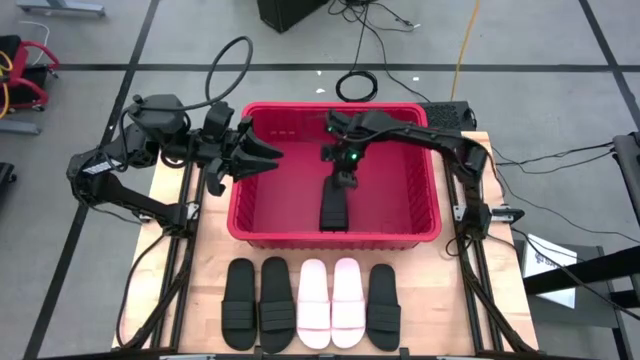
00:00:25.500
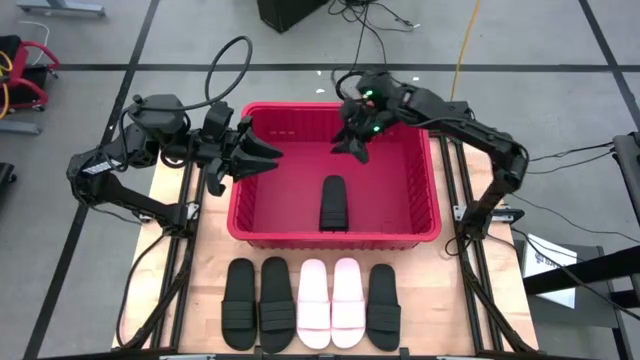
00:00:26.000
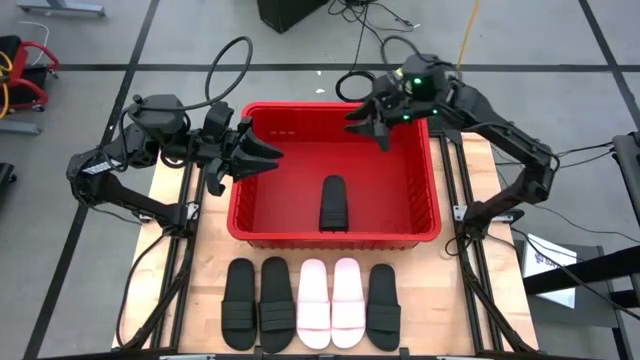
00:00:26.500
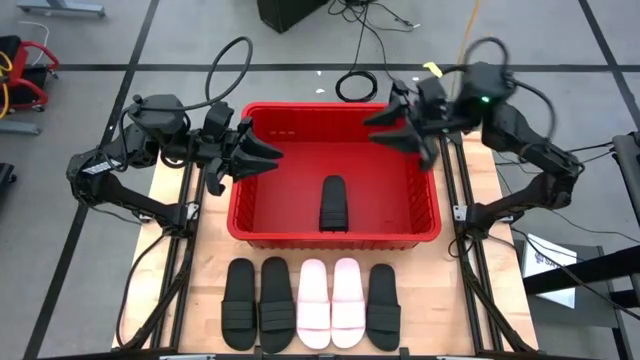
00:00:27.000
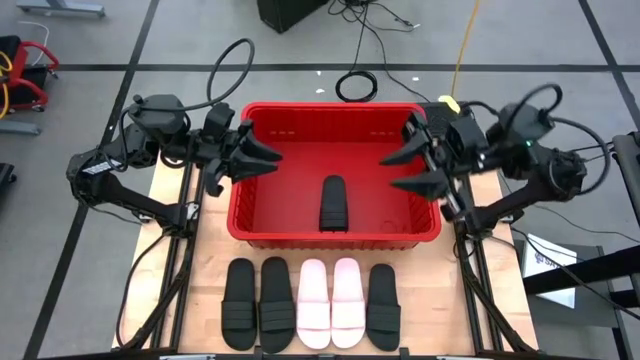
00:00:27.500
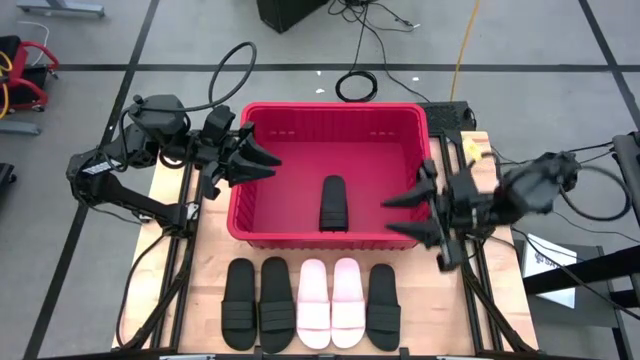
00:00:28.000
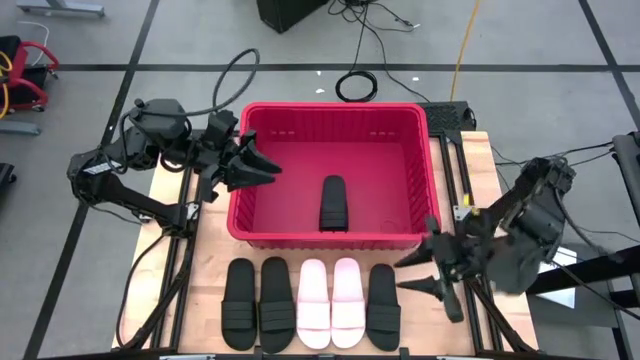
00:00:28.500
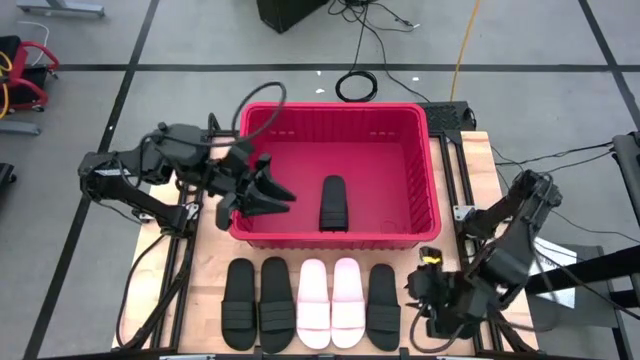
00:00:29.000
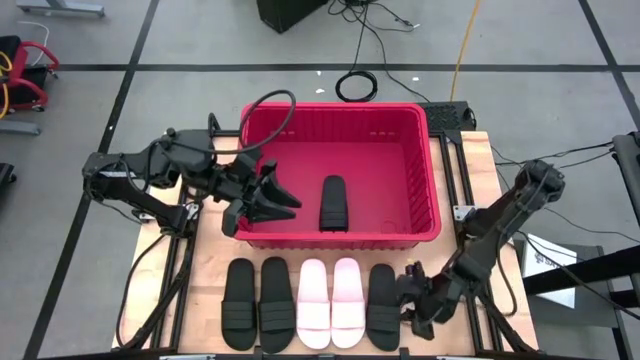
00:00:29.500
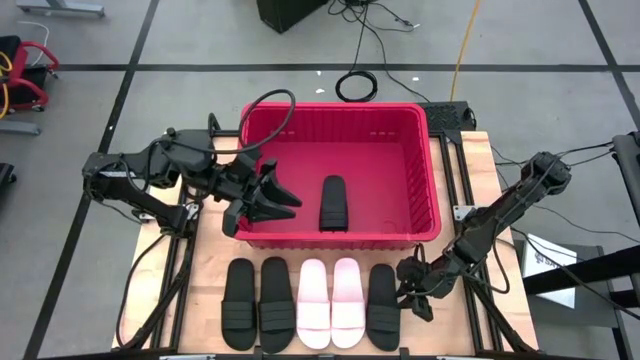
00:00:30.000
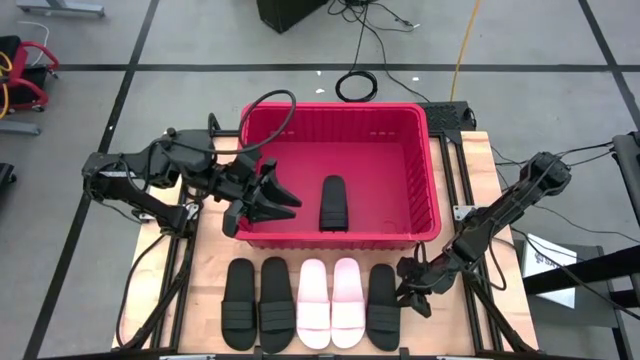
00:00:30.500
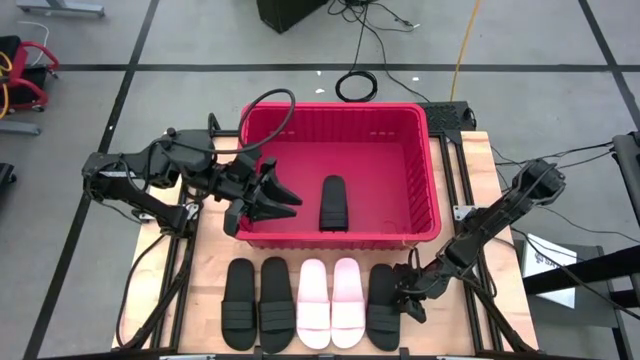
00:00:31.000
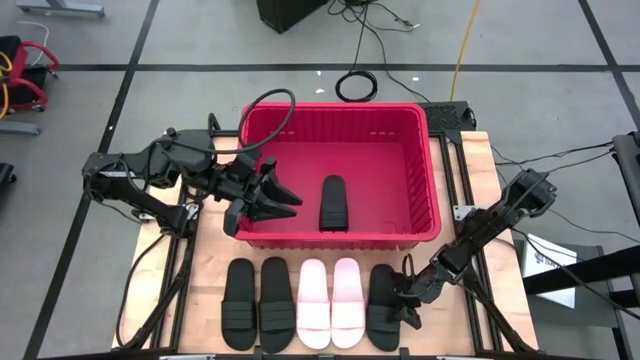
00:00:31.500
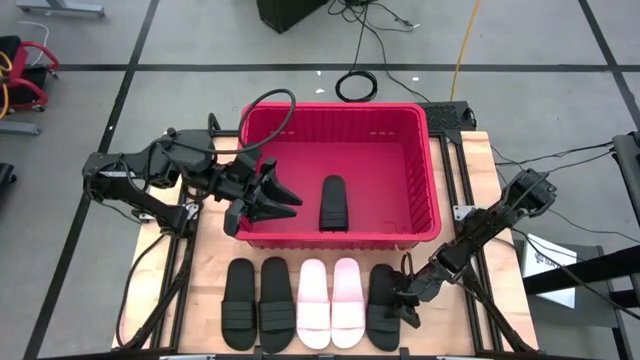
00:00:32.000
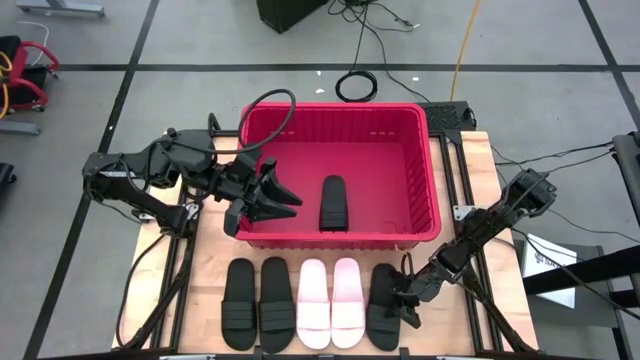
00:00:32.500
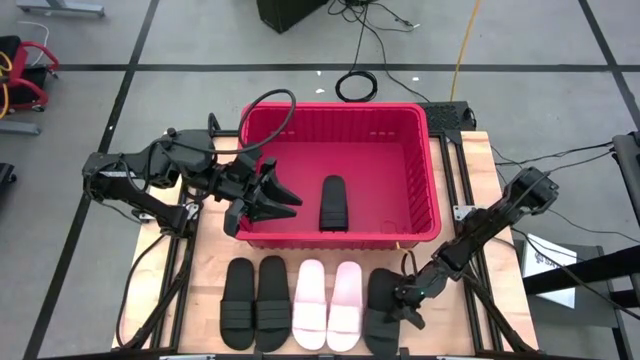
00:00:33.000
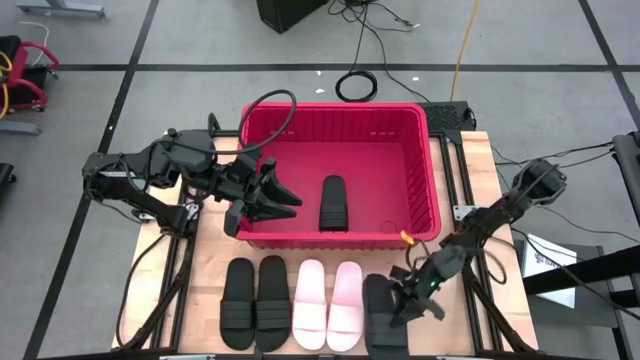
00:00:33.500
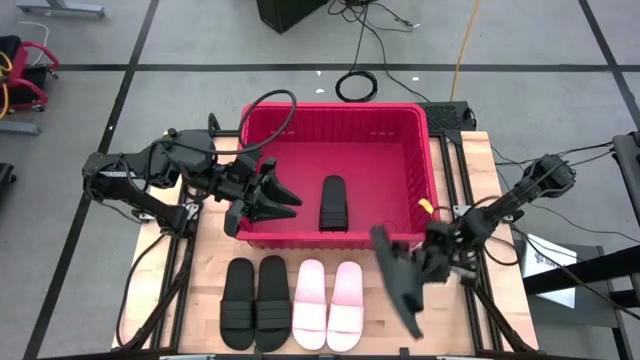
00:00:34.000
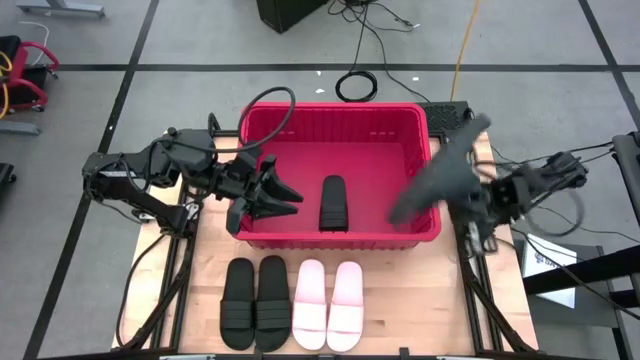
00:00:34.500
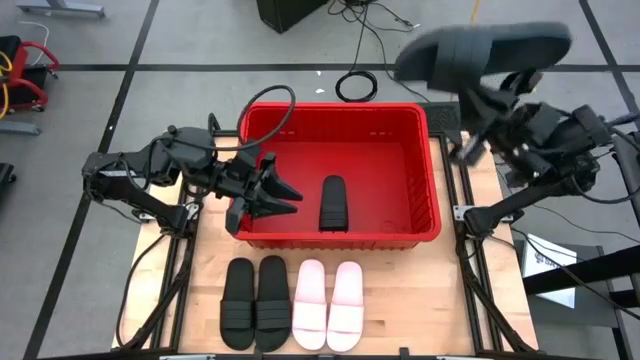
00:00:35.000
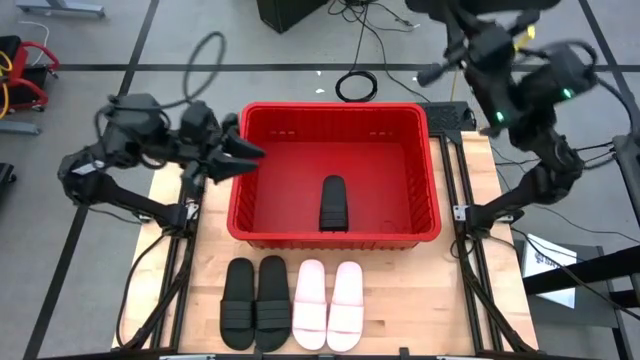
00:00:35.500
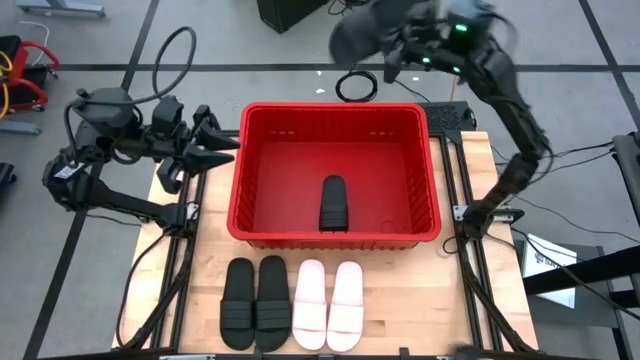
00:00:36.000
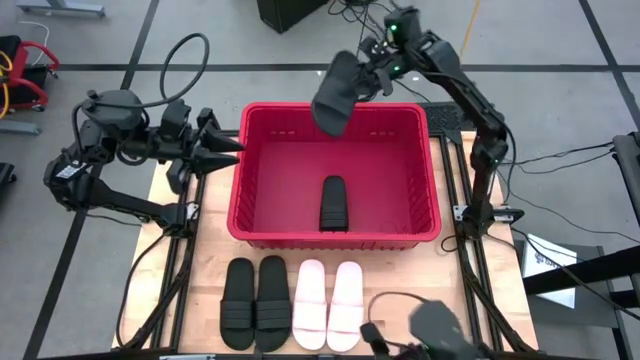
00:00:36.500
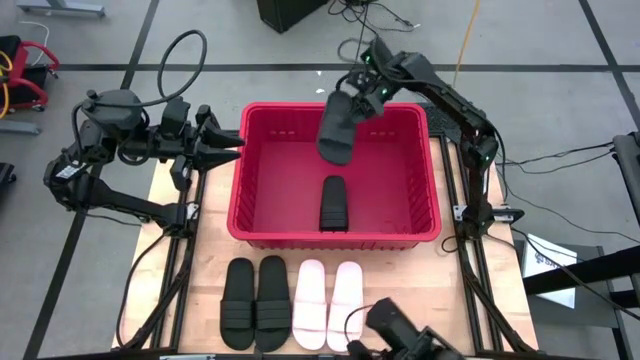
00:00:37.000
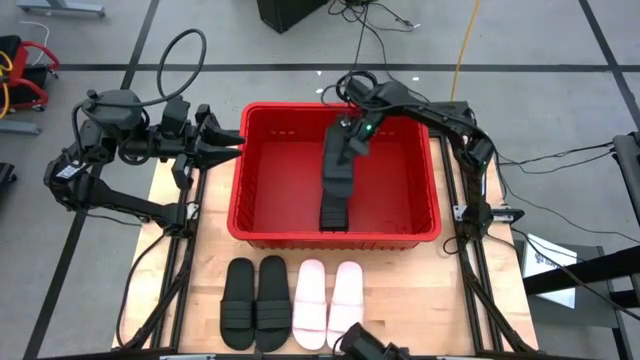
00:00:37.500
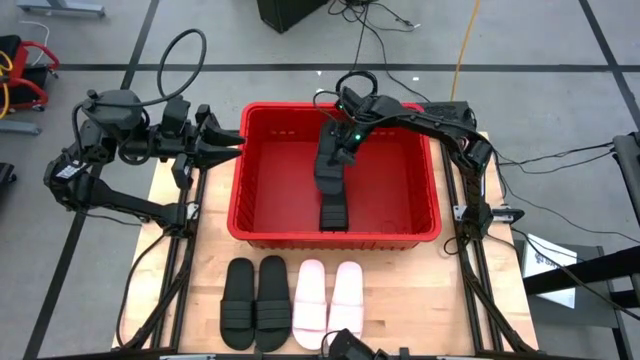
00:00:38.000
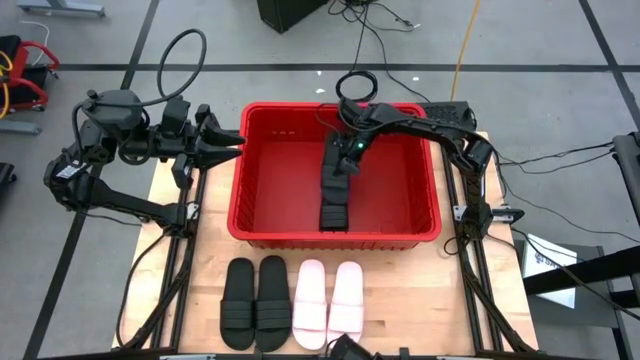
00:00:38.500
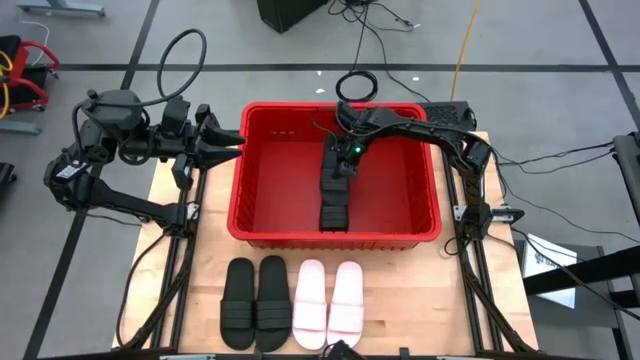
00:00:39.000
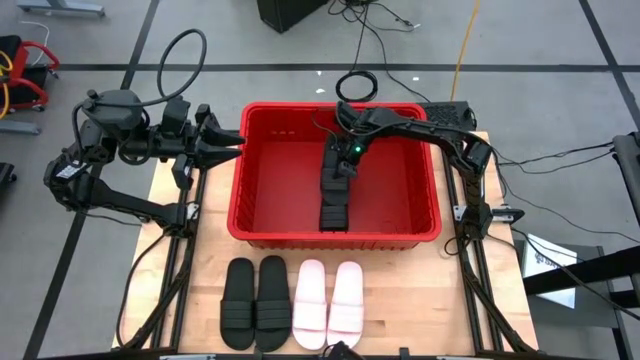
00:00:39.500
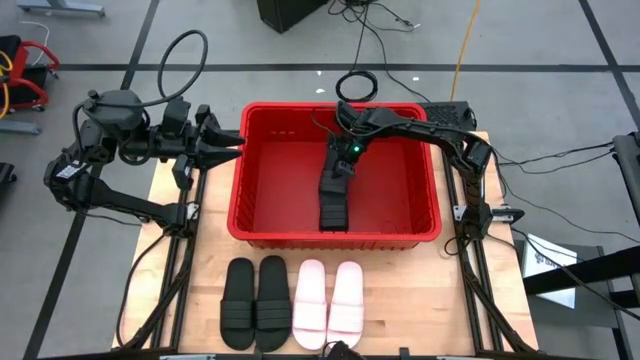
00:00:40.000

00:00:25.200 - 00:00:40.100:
Task: Pick and place slides into bin
Put the black slipper into the red bin
